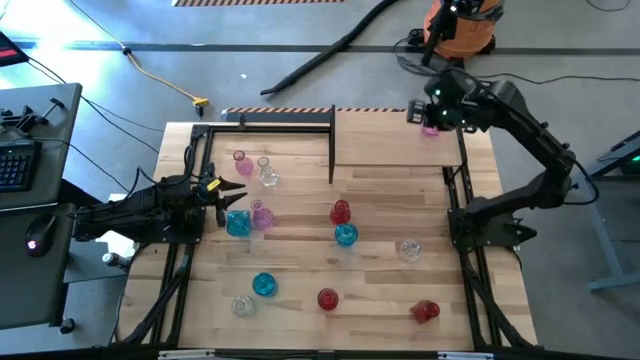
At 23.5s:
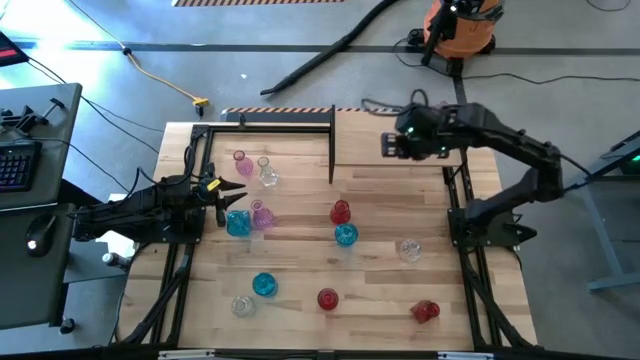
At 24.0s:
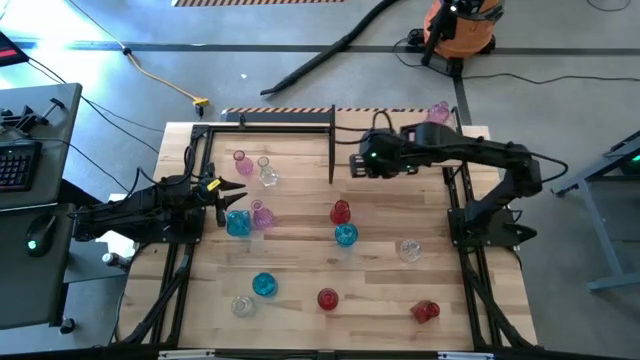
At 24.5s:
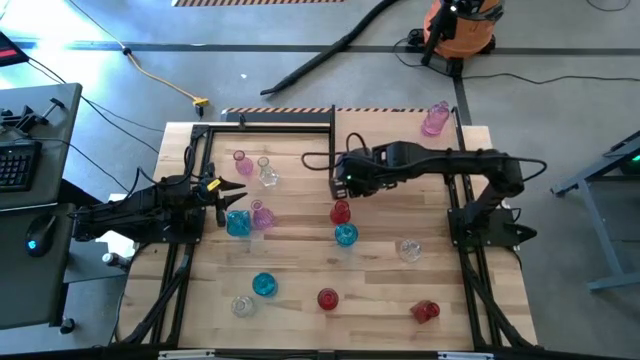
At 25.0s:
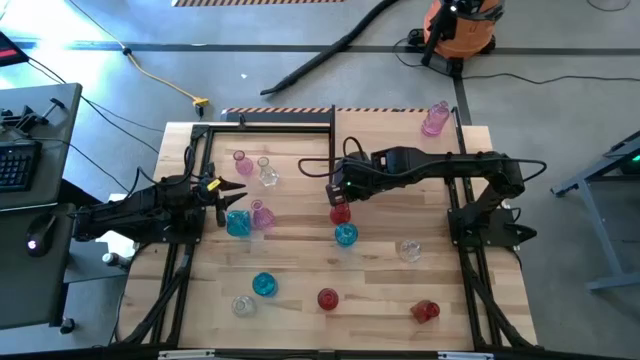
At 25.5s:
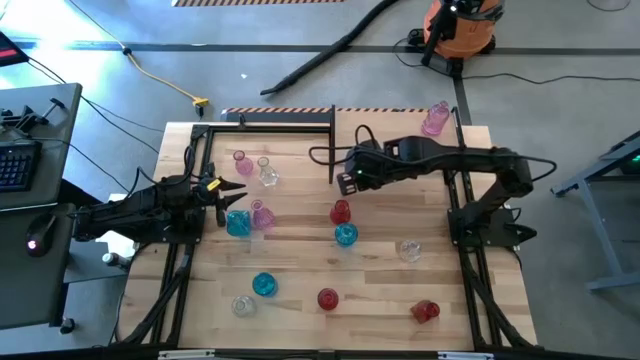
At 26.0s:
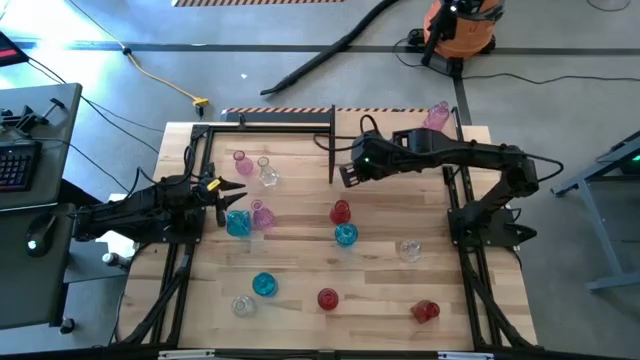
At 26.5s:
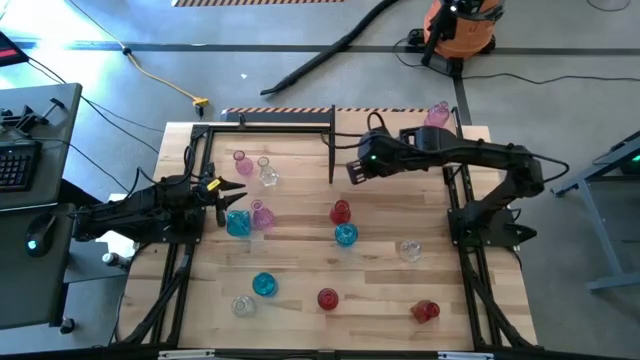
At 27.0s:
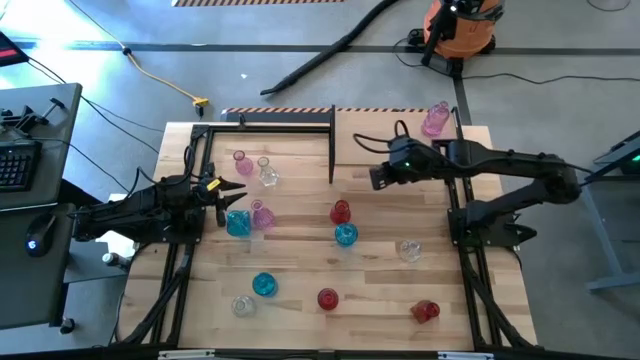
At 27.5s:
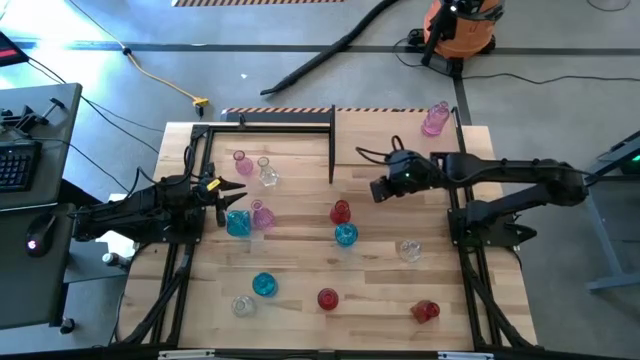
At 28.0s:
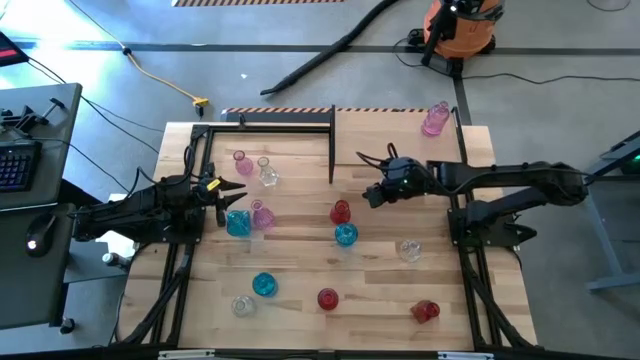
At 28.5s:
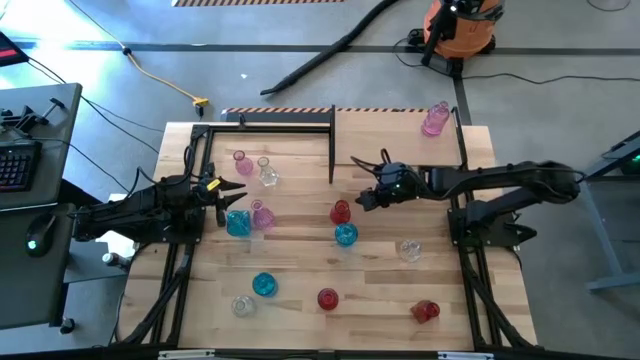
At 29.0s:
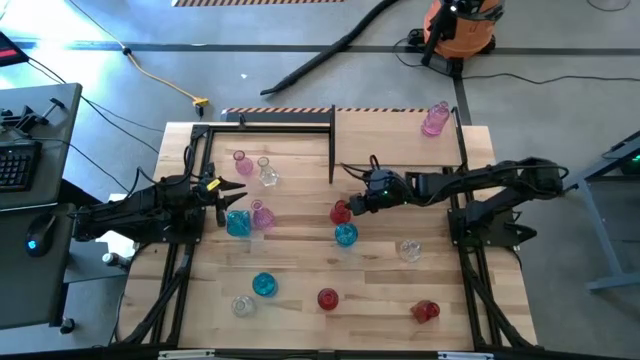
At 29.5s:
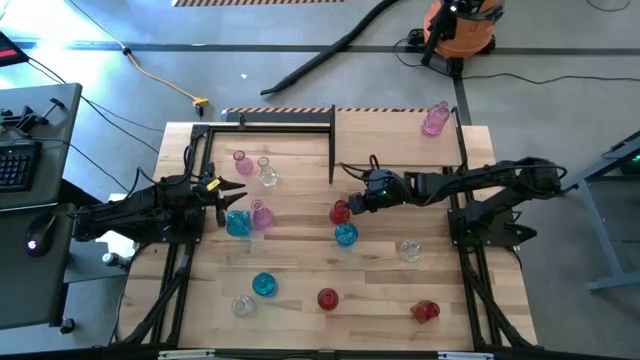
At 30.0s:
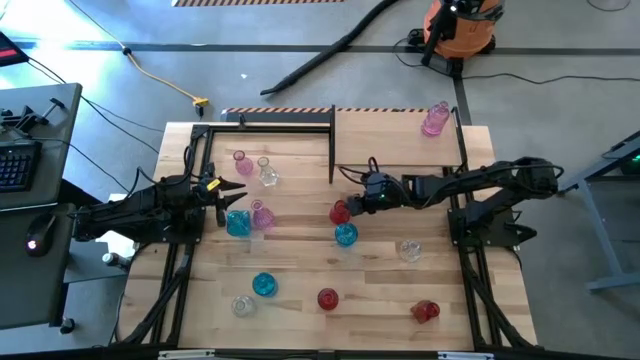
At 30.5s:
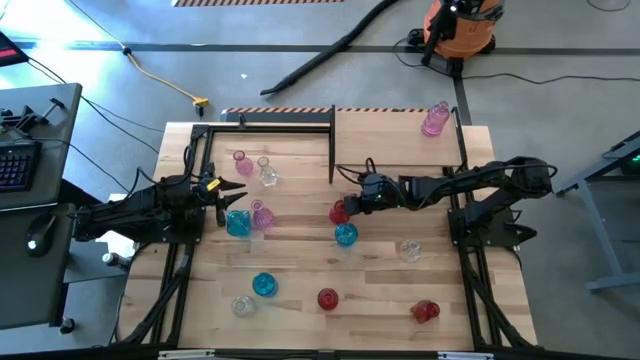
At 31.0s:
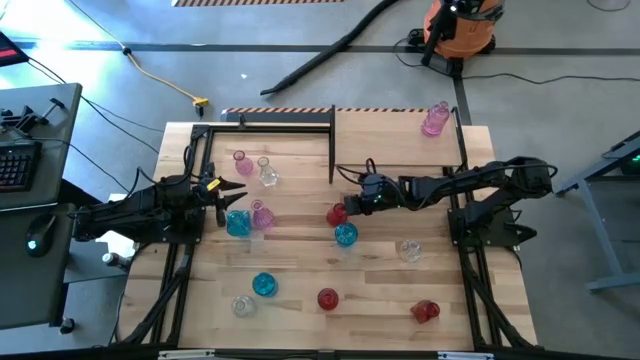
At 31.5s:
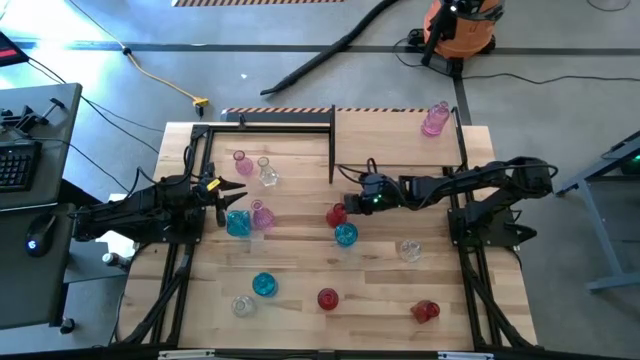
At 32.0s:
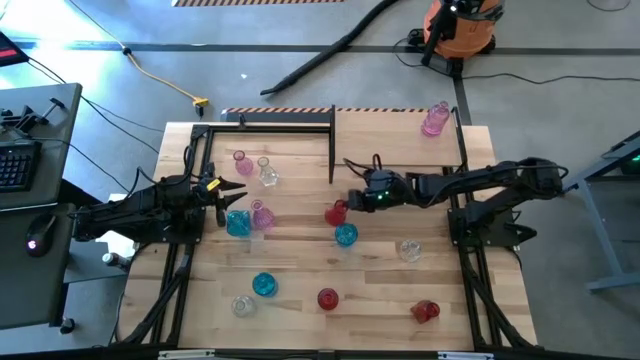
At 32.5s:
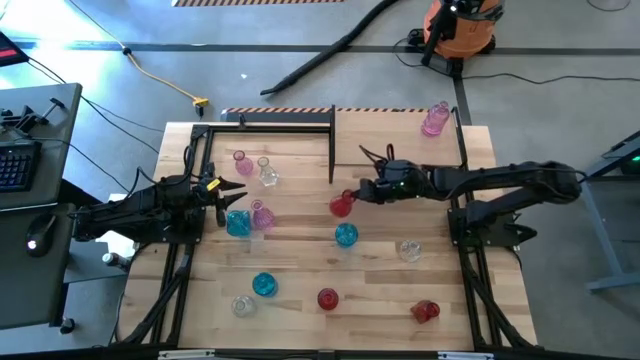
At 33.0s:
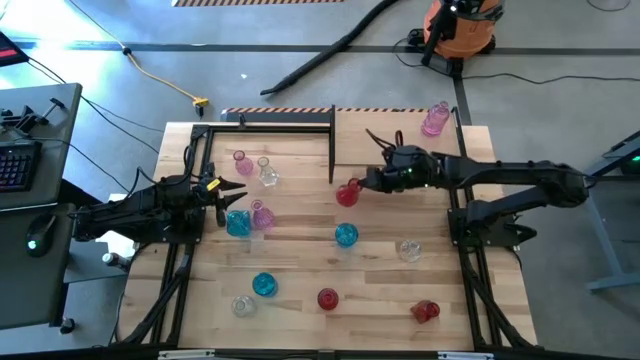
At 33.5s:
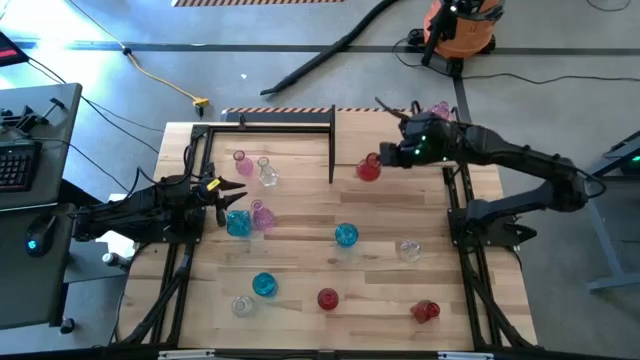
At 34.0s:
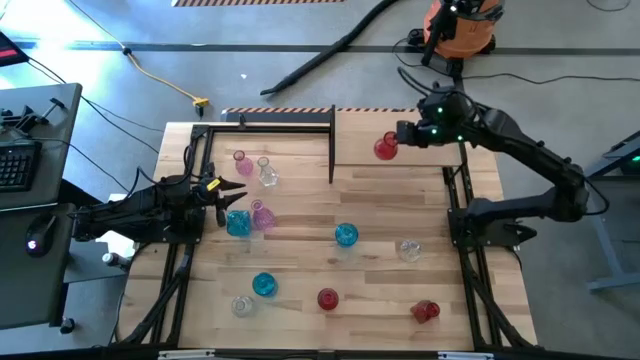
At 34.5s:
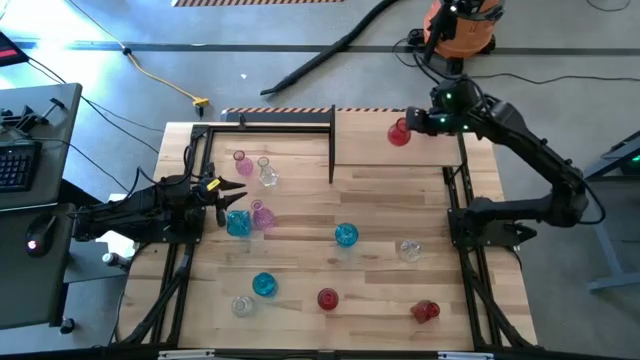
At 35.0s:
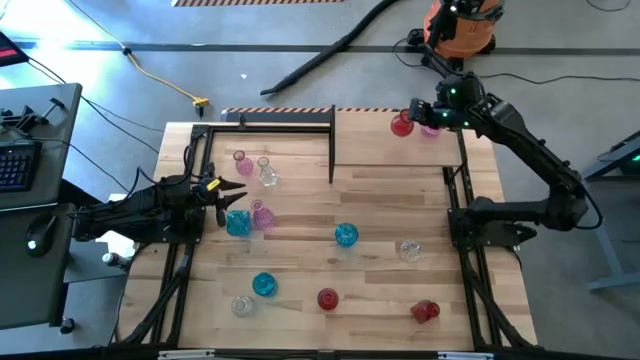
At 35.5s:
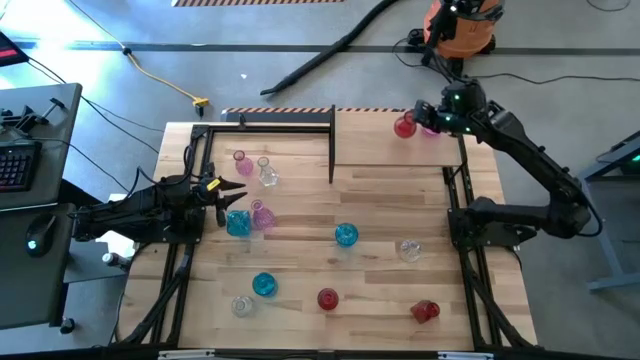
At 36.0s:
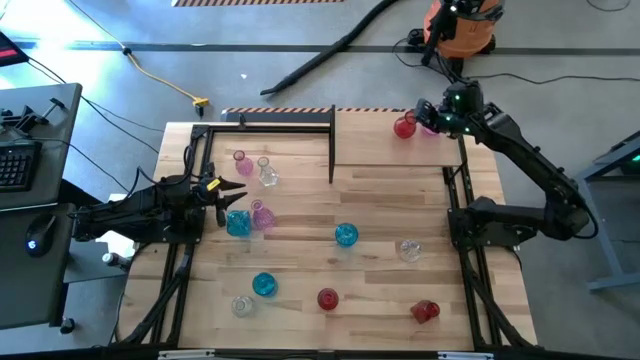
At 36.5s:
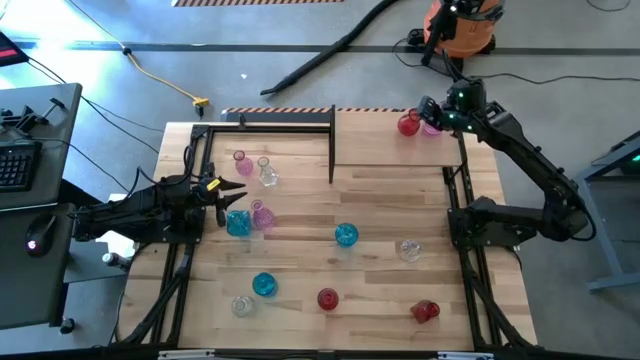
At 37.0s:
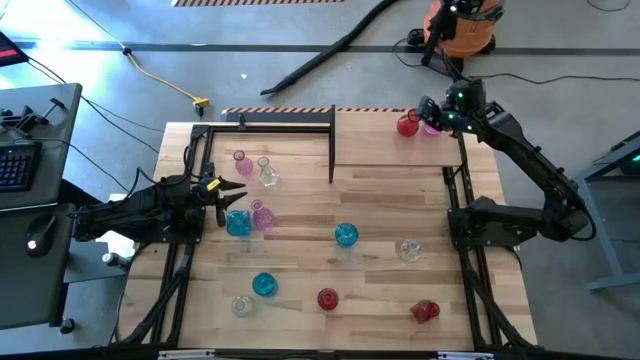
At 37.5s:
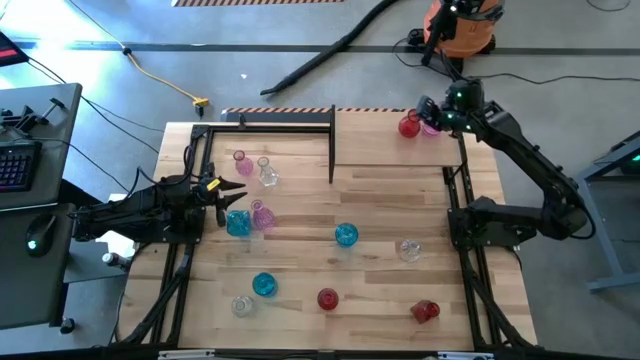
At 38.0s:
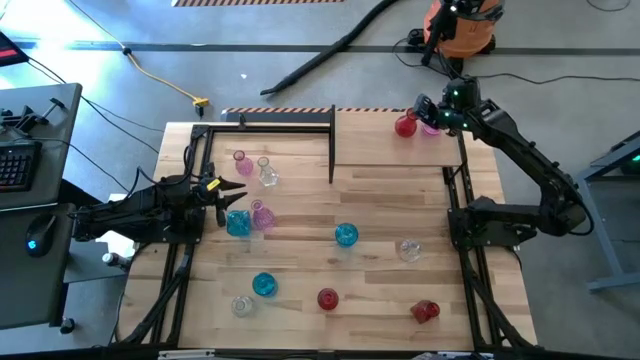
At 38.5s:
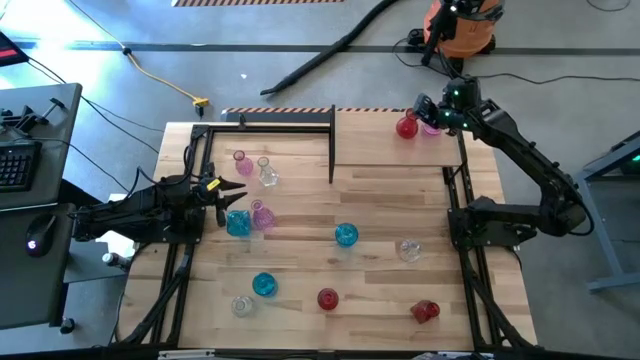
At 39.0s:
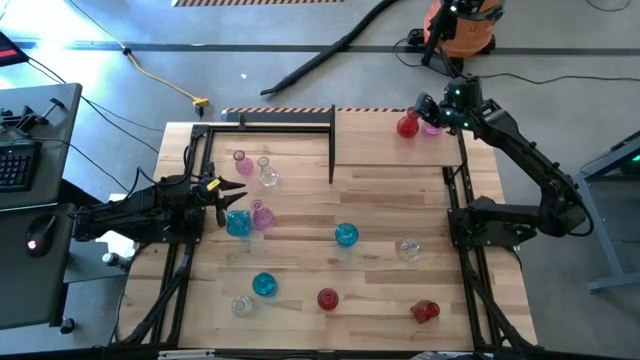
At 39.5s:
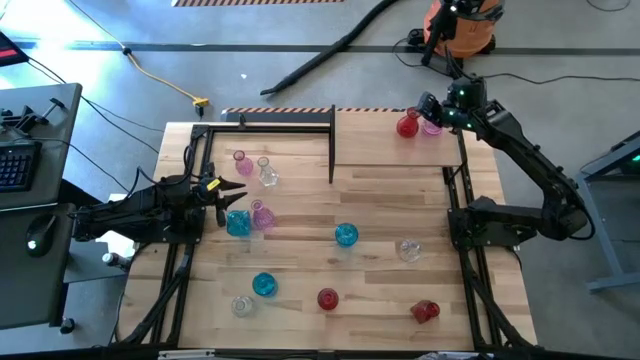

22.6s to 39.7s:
Task: sort vases onto shelf
Put the top red vase on the shelf

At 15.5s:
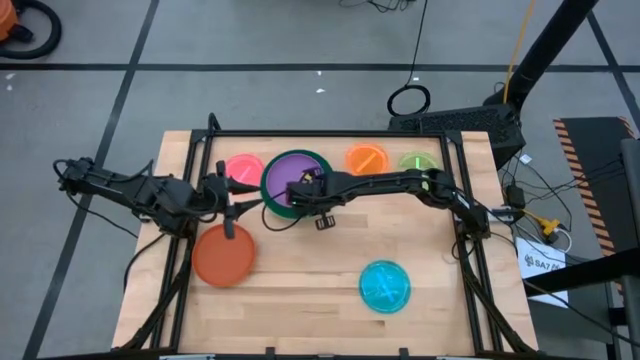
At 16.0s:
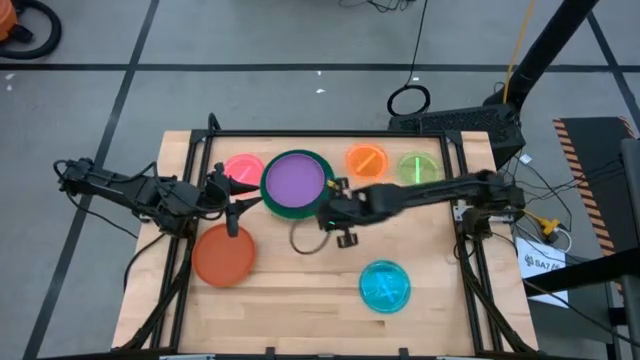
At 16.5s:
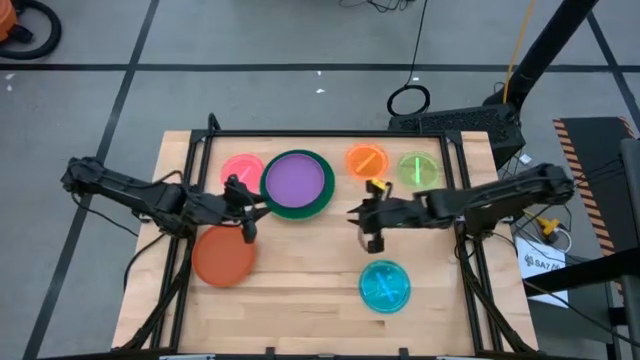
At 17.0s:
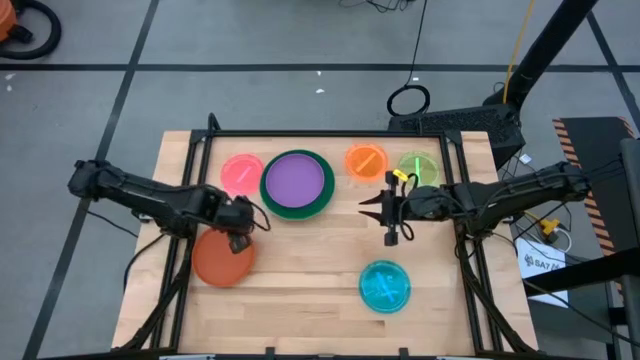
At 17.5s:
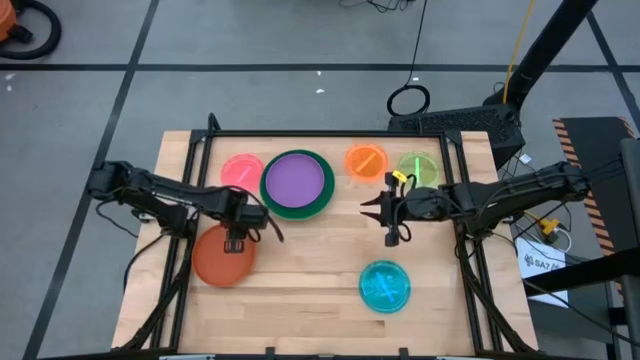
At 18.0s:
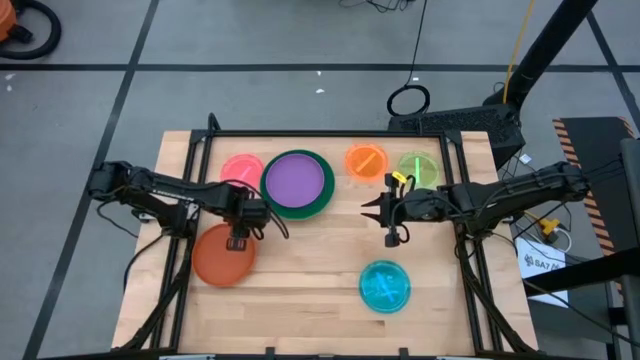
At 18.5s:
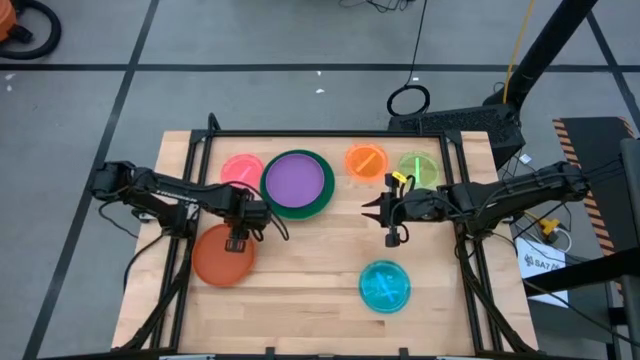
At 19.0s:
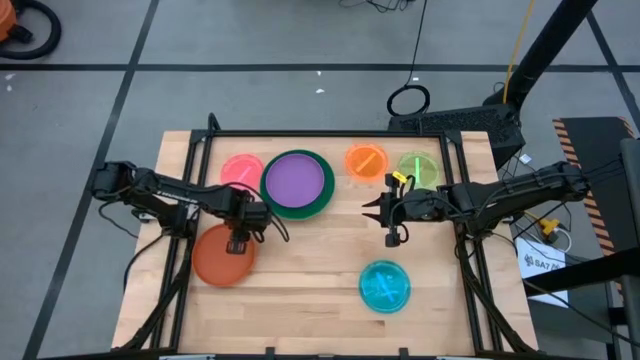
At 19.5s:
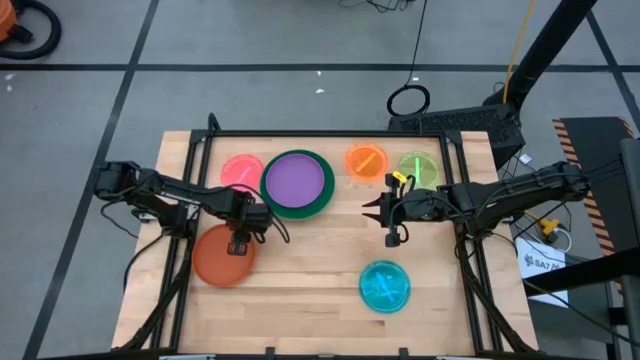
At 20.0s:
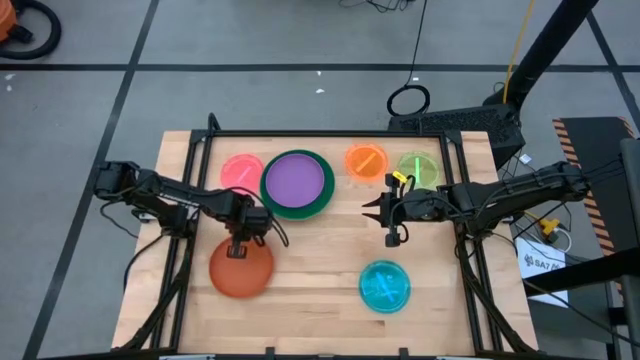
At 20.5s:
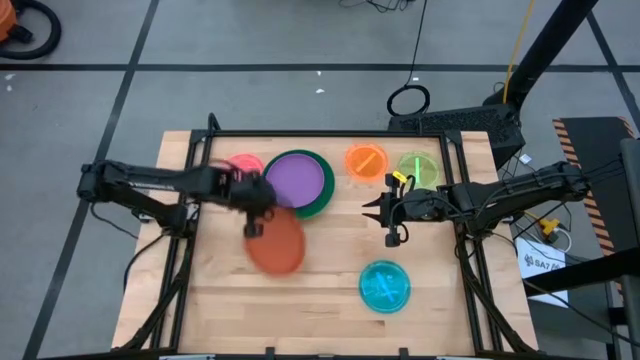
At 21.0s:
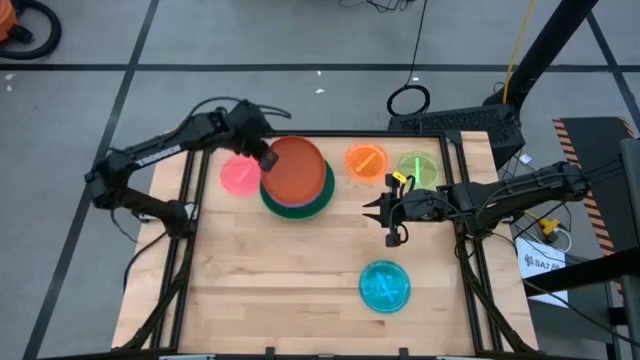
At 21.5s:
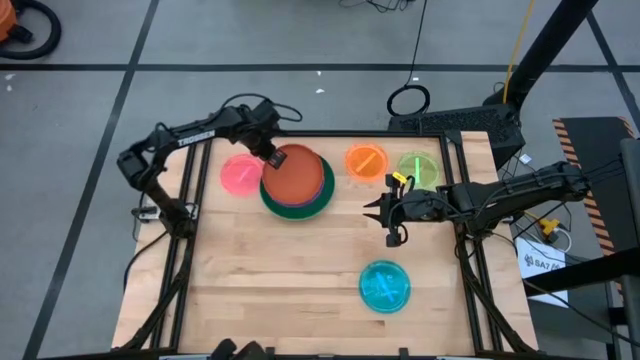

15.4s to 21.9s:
Task: Stack plastic plates
Stack the left orange plate on top of the purple plate
